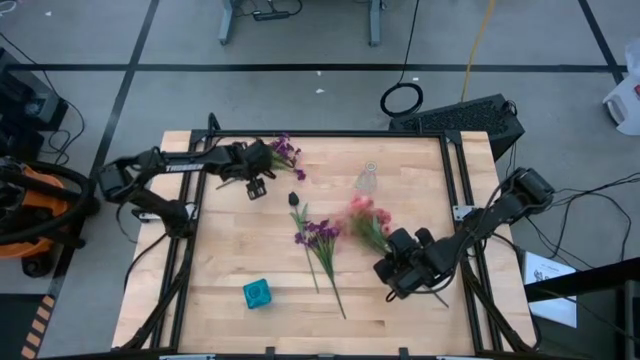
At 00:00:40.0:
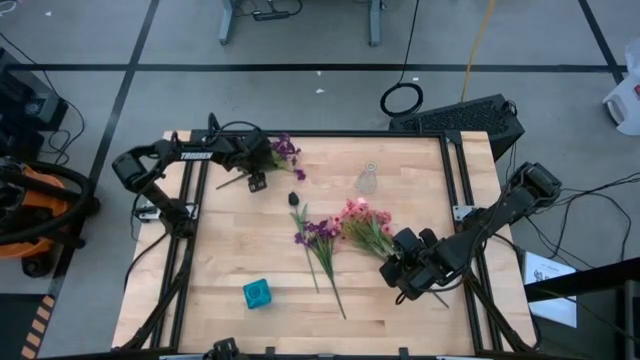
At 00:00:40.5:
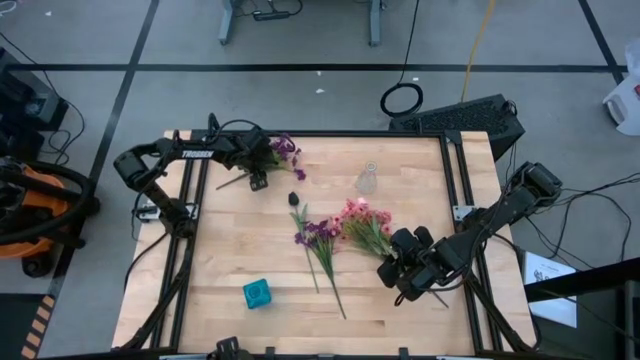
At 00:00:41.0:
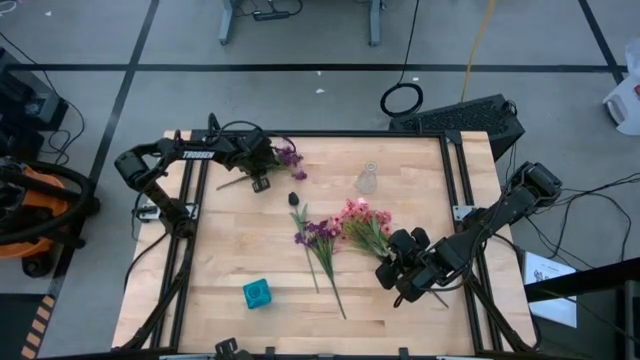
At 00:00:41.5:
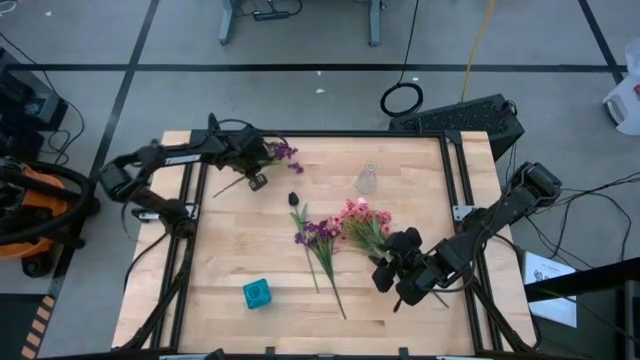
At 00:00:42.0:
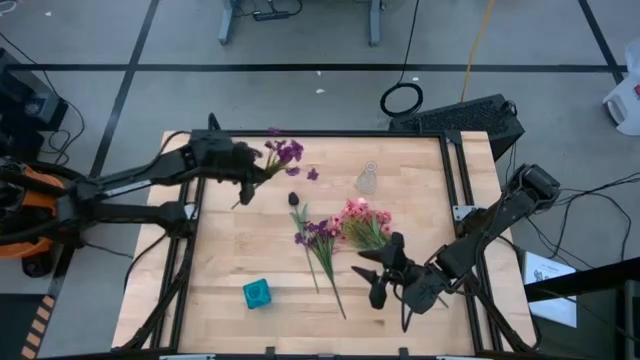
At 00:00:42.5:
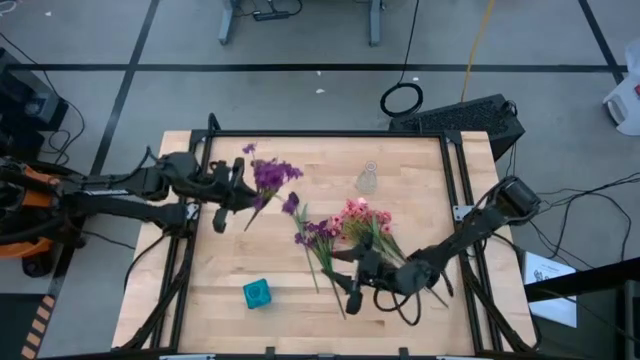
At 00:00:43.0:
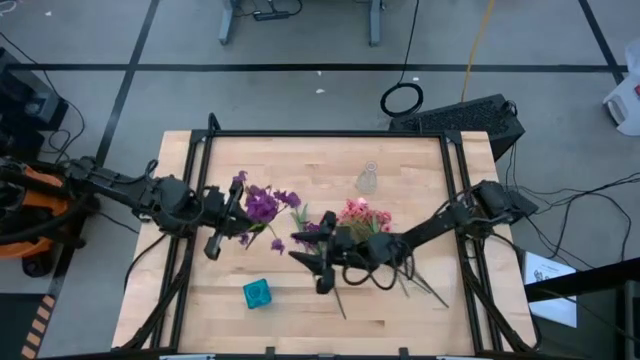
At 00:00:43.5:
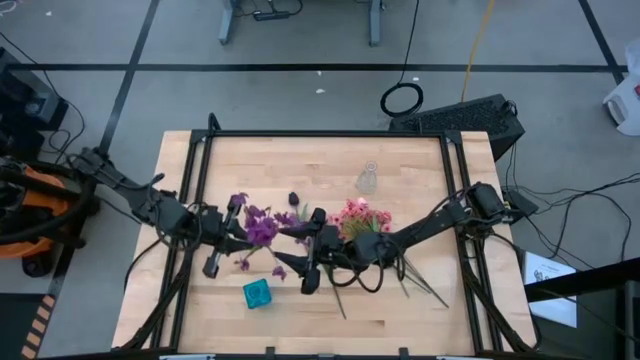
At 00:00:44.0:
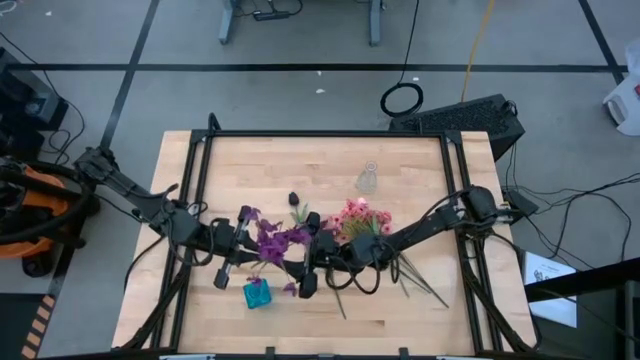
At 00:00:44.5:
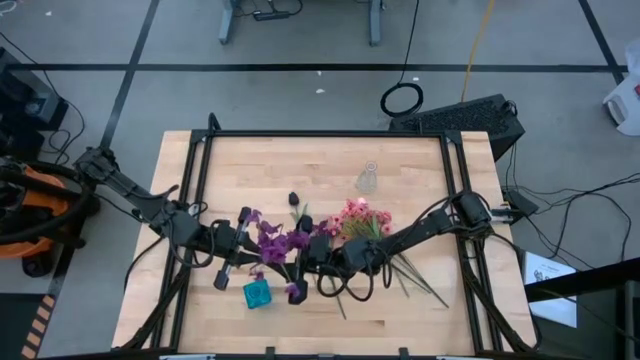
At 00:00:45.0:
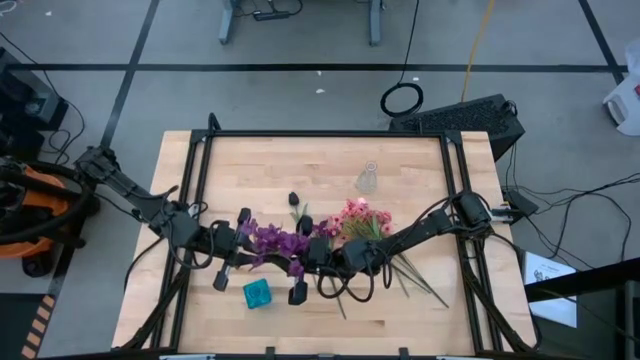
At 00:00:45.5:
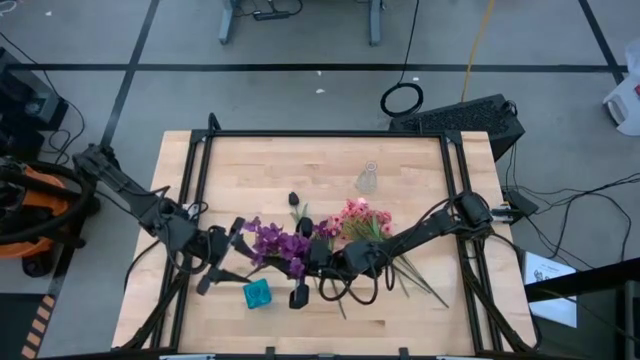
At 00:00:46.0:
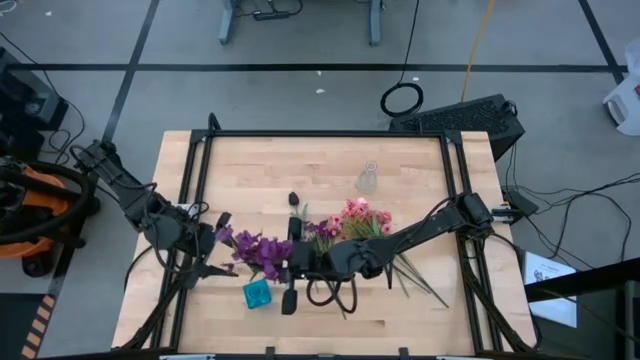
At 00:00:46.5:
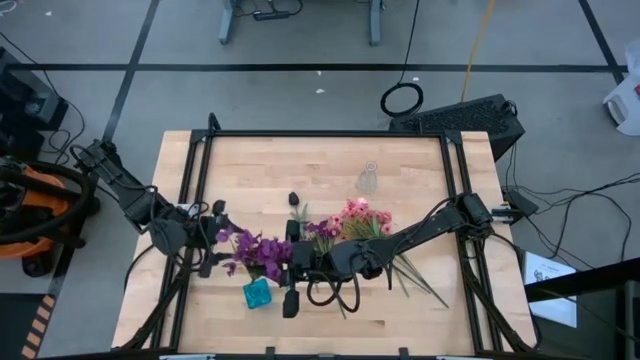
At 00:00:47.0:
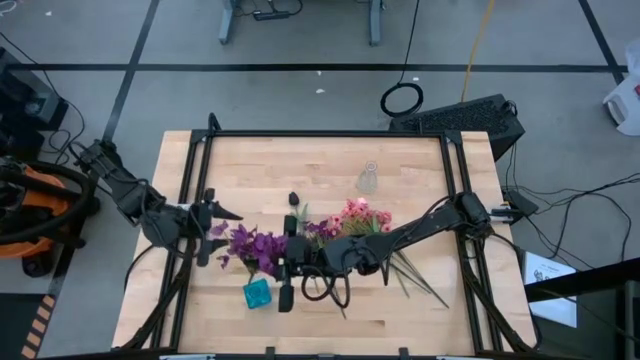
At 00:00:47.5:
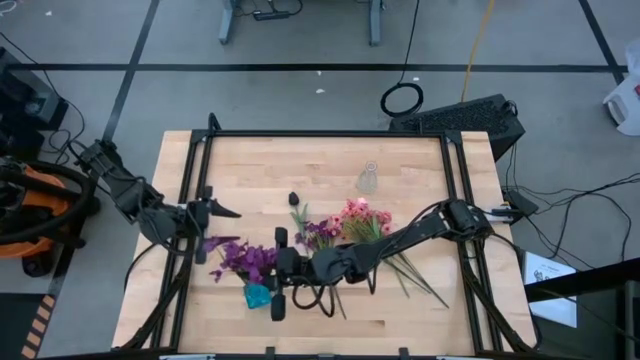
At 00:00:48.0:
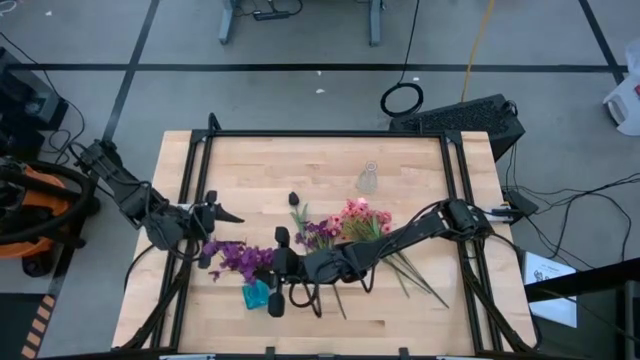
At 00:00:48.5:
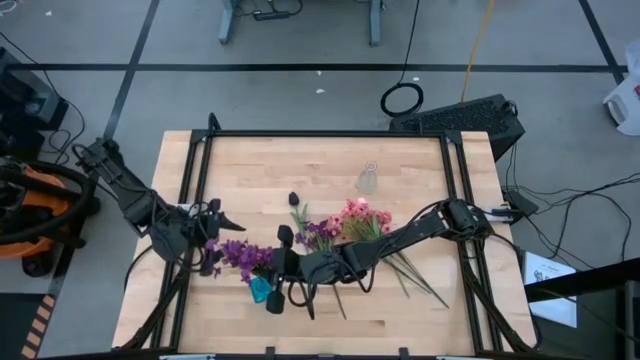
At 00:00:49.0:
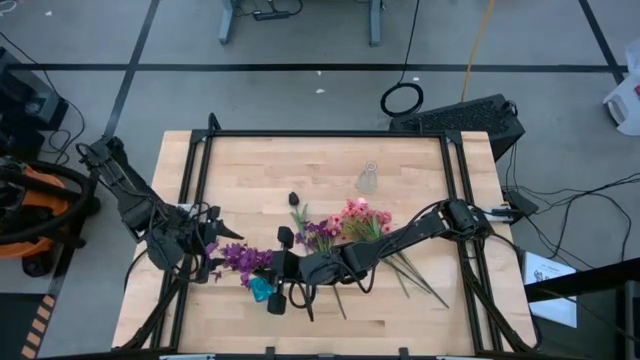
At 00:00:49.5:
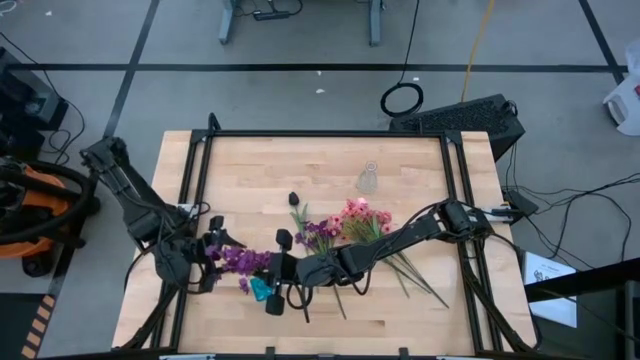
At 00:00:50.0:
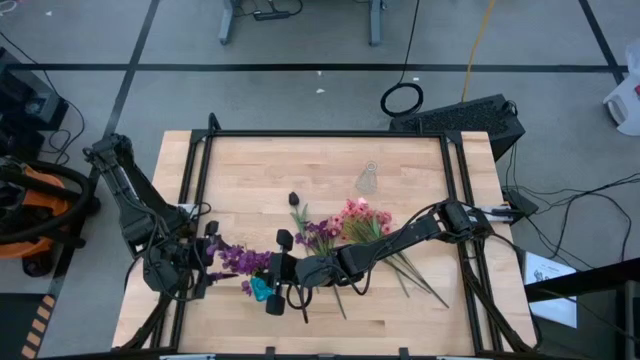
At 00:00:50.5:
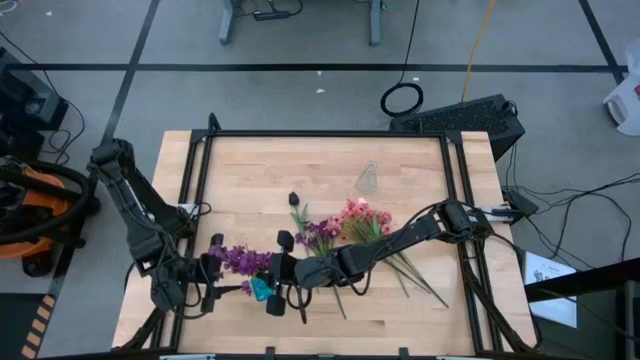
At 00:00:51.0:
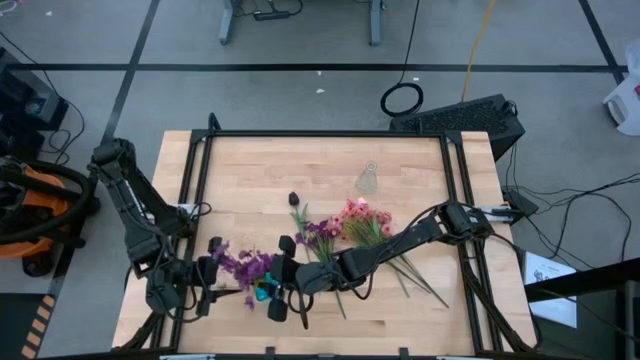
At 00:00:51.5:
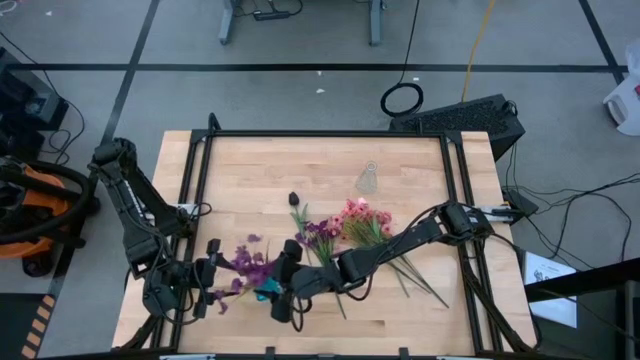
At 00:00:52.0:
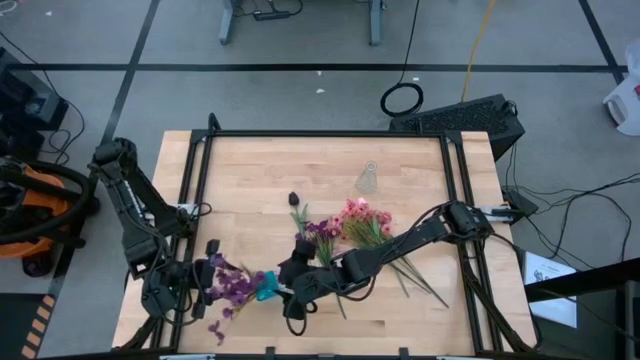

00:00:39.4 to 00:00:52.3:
Task: Sort flowers into vase by color
Put the top violet flower into the blue vase

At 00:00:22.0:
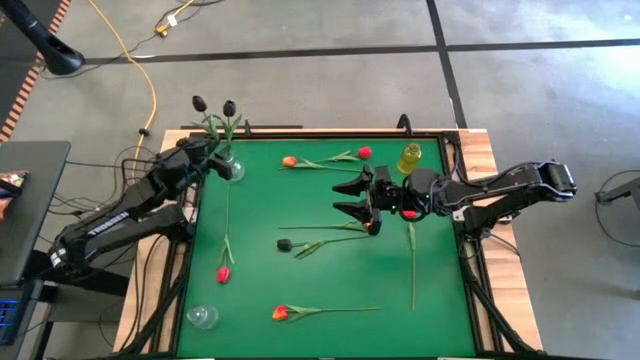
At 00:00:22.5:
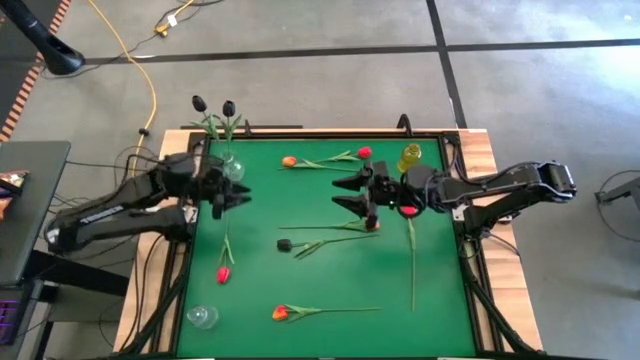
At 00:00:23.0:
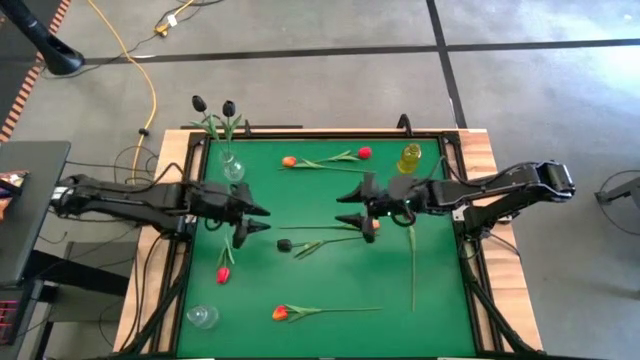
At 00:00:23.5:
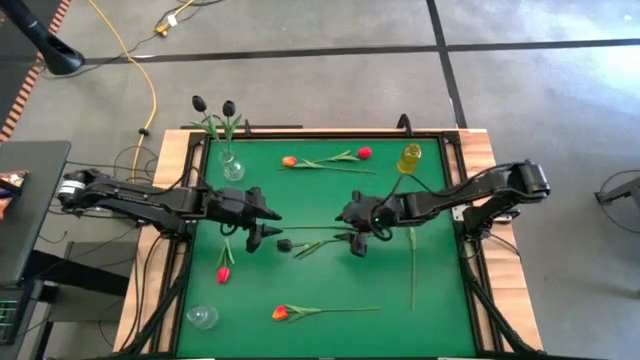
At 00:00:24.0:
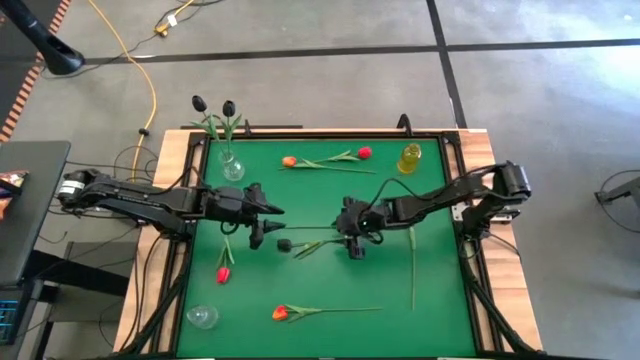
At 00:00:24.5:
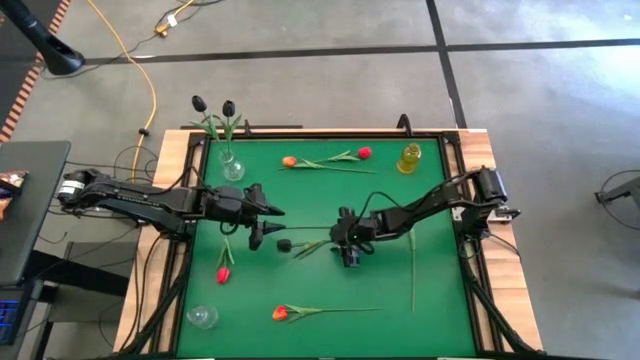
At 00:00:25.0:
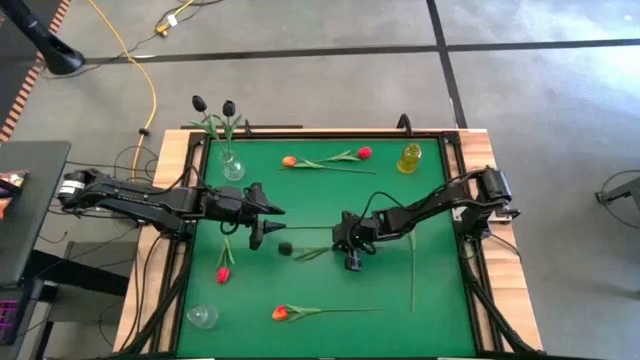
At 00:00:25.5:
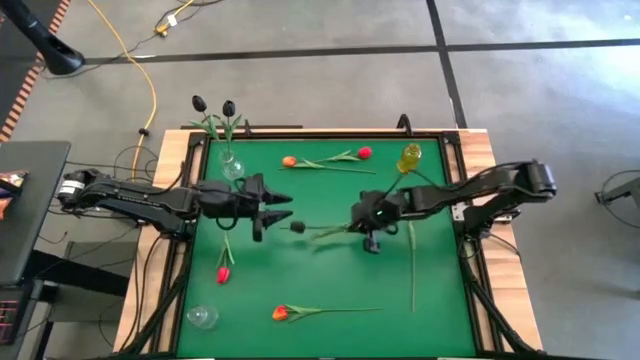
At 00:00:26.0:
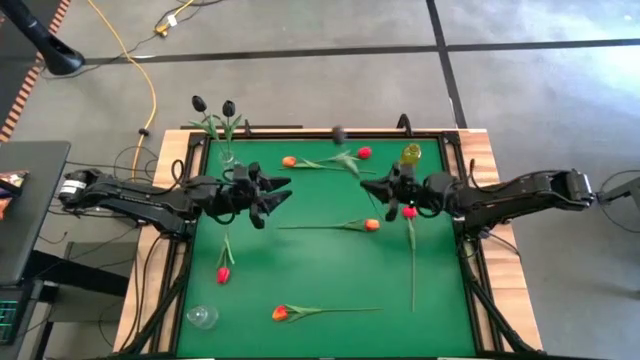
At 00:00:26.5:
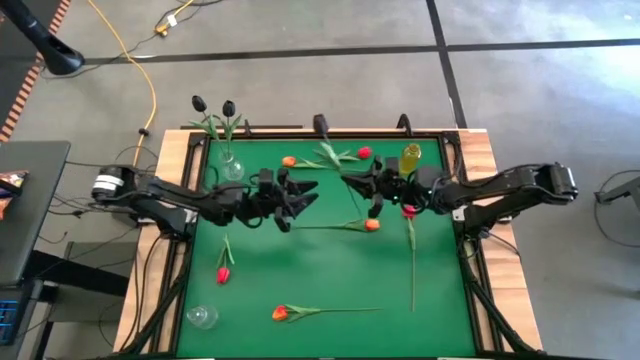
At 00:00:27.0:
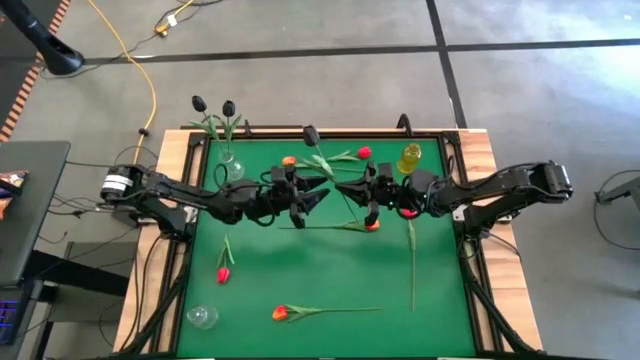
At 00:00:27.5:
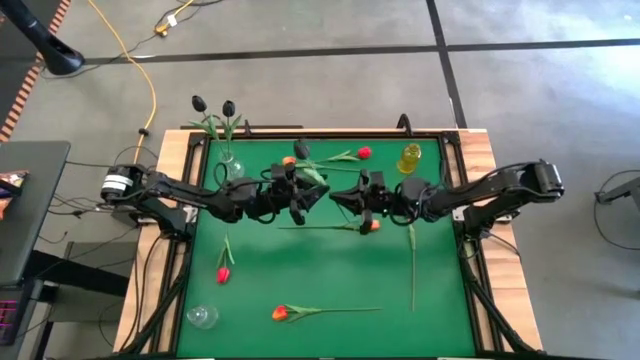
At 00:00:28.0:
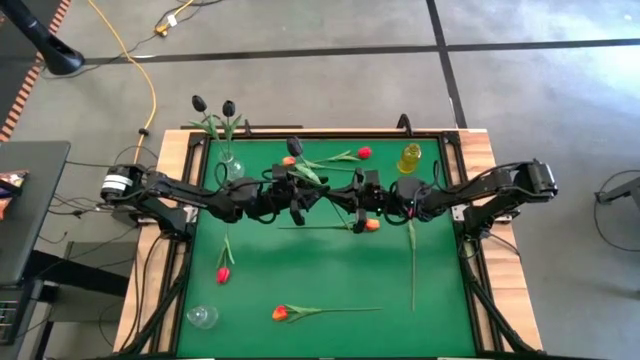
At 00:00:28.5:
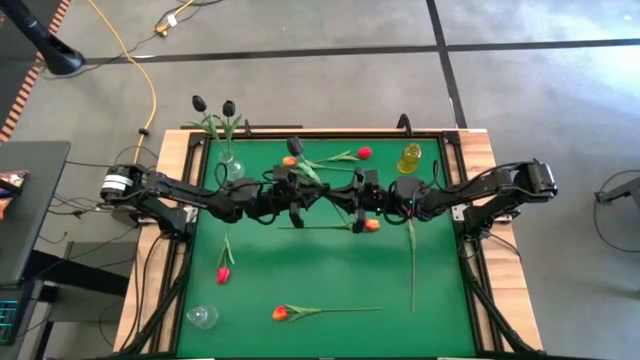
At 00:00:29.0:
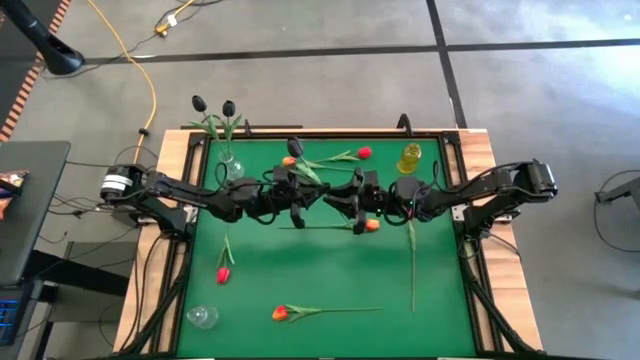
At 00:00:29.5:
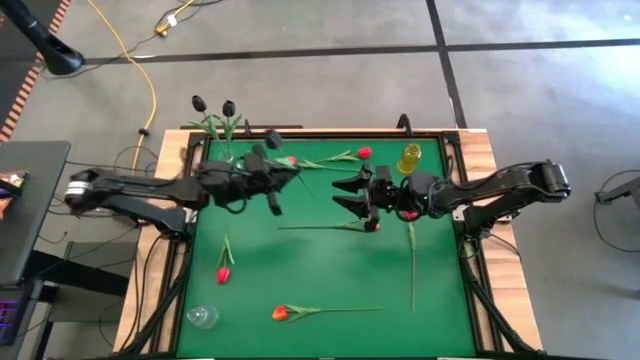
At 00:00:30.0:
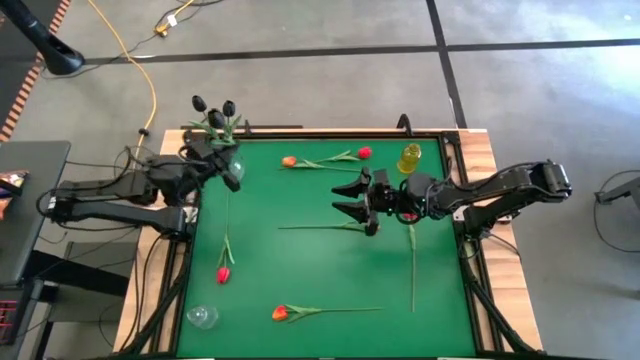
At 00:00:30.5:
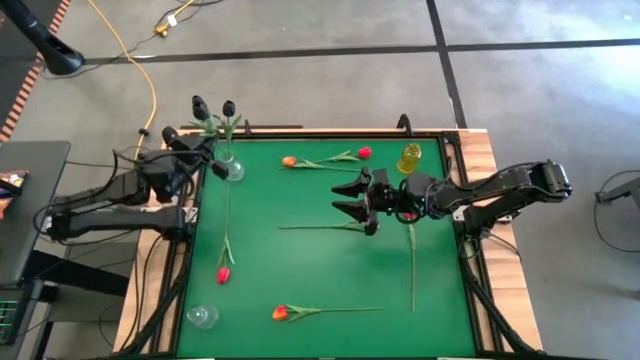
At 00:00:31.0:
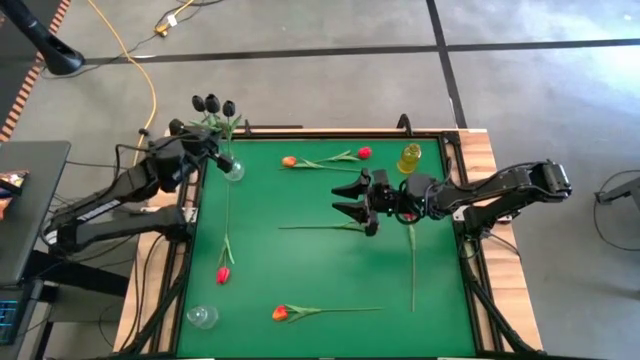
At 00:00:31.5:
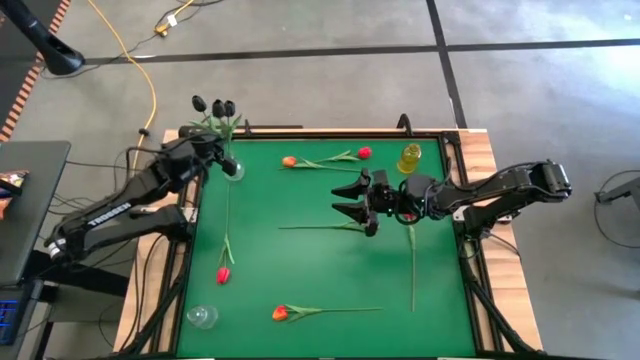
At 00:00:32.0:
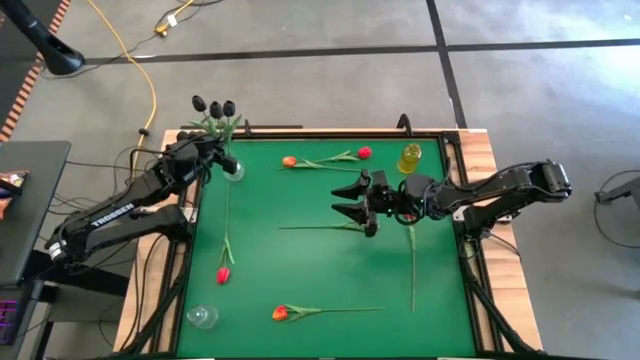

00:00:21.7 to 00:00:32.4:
Task: Sort flowers into vase by color
Put the black flower into the top transparent vase
